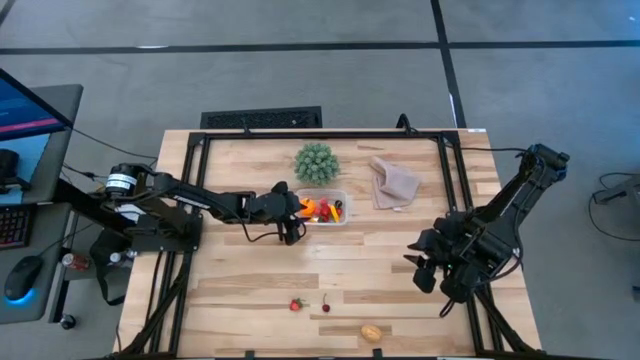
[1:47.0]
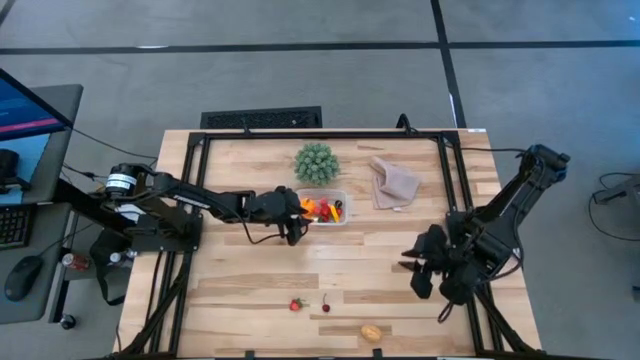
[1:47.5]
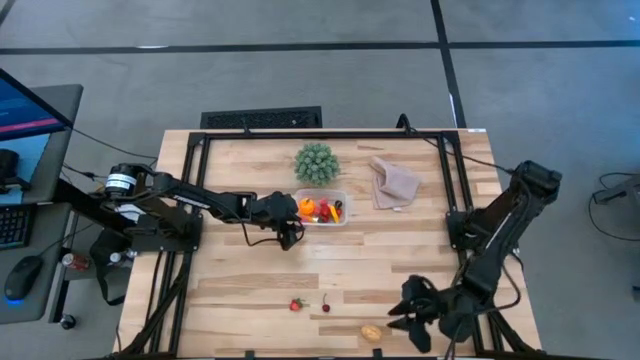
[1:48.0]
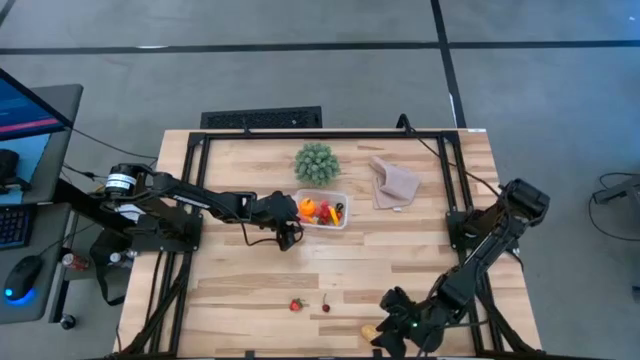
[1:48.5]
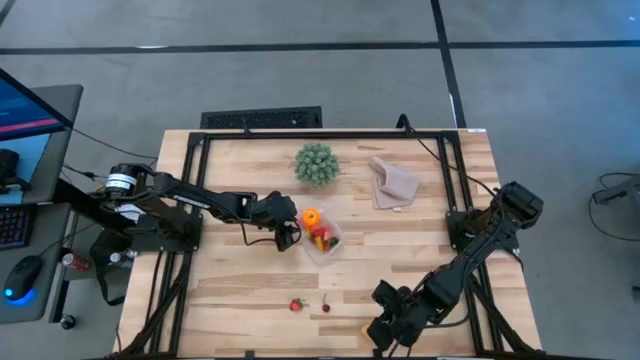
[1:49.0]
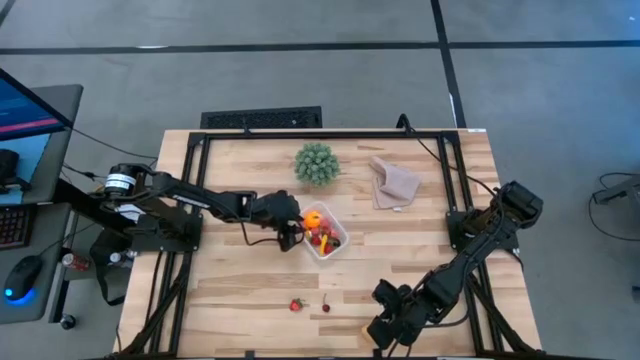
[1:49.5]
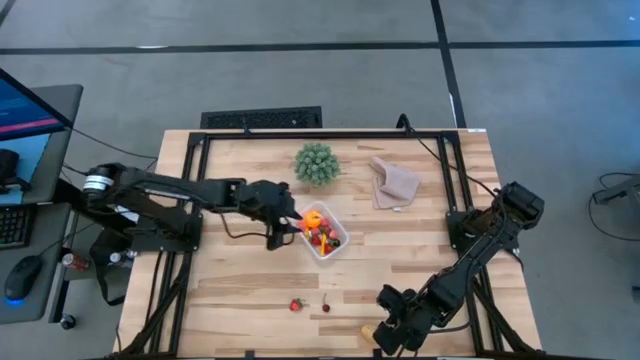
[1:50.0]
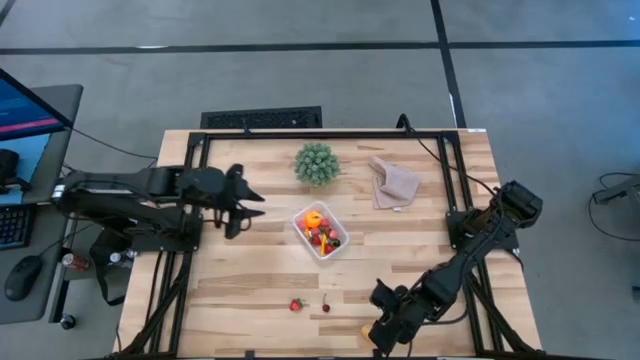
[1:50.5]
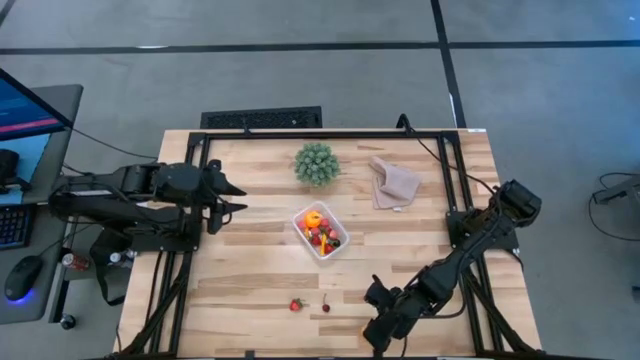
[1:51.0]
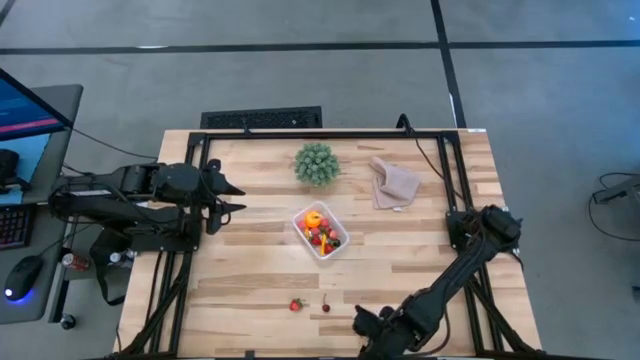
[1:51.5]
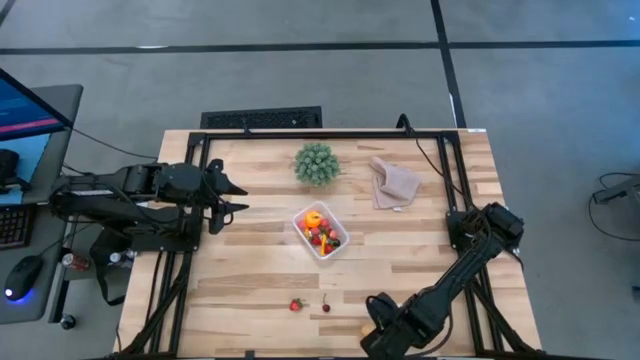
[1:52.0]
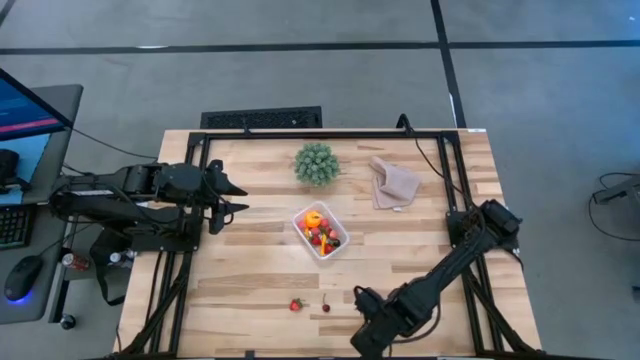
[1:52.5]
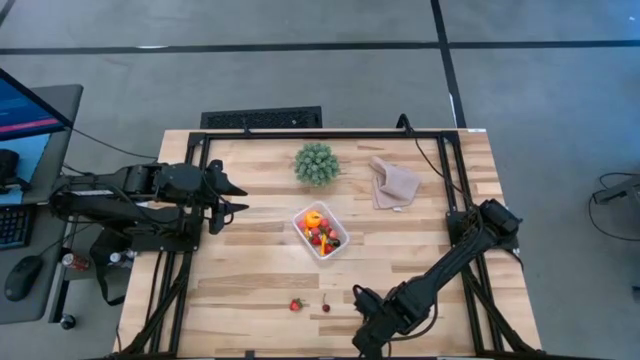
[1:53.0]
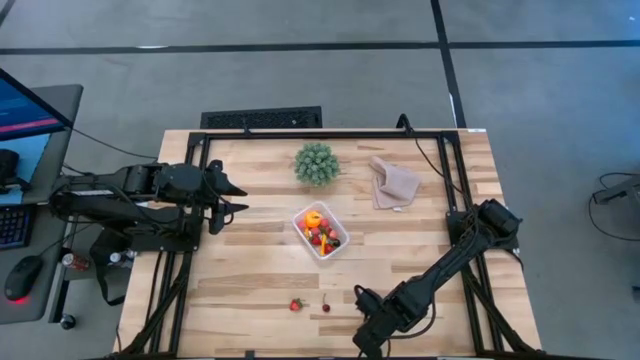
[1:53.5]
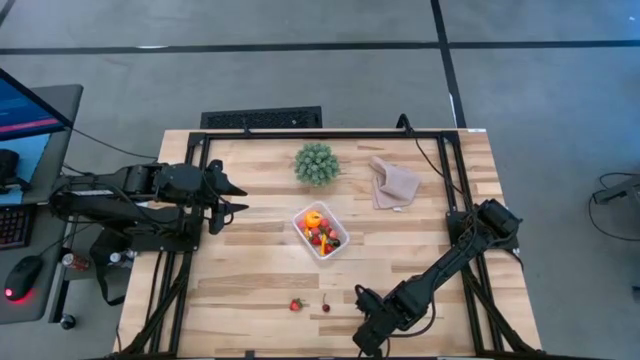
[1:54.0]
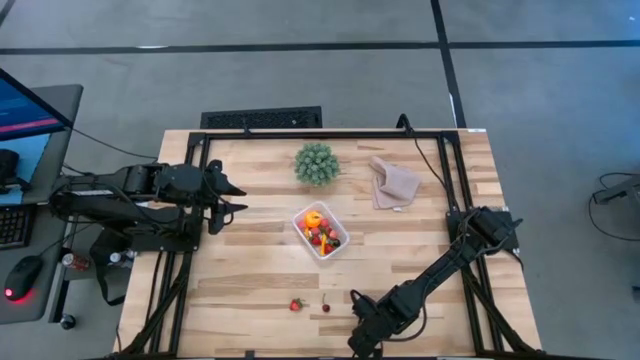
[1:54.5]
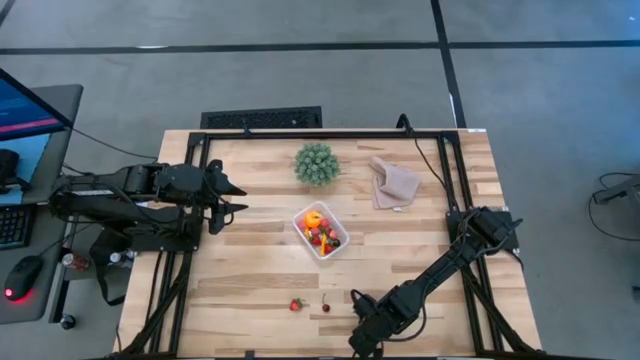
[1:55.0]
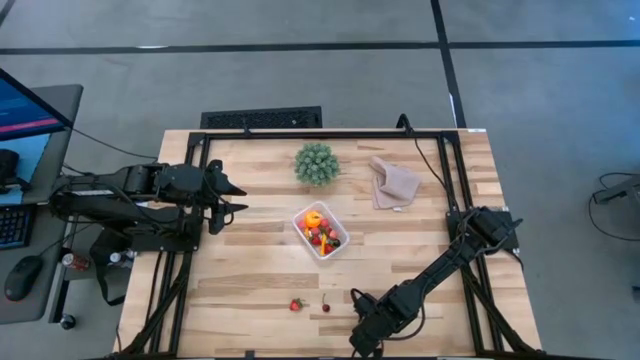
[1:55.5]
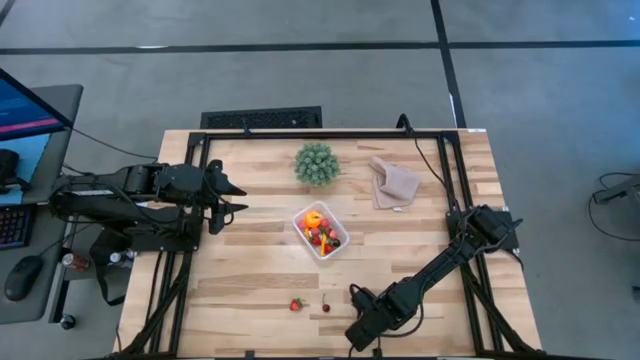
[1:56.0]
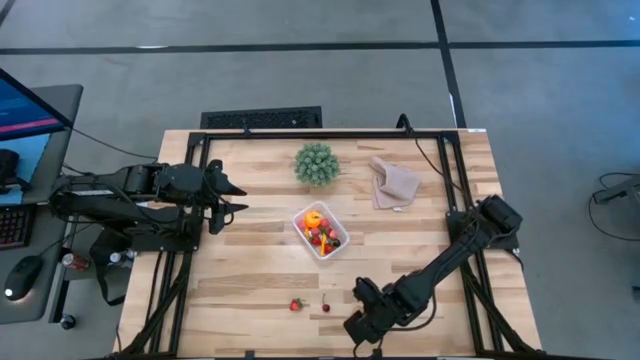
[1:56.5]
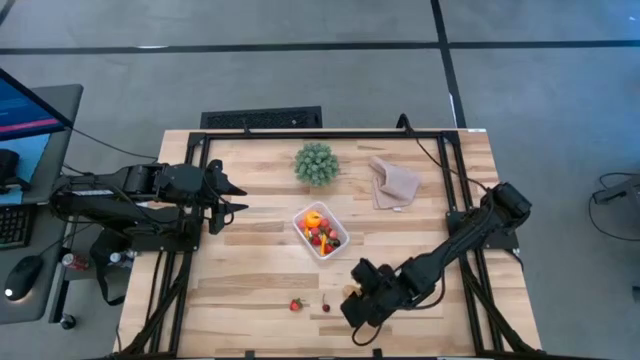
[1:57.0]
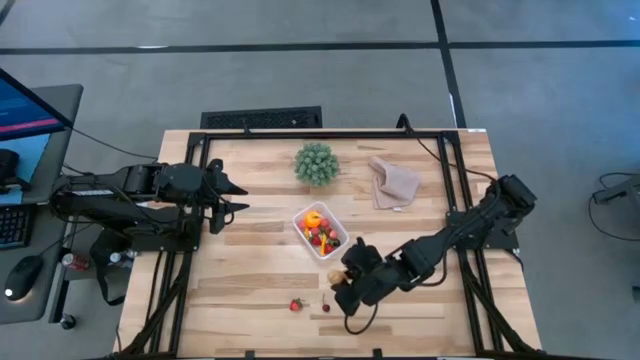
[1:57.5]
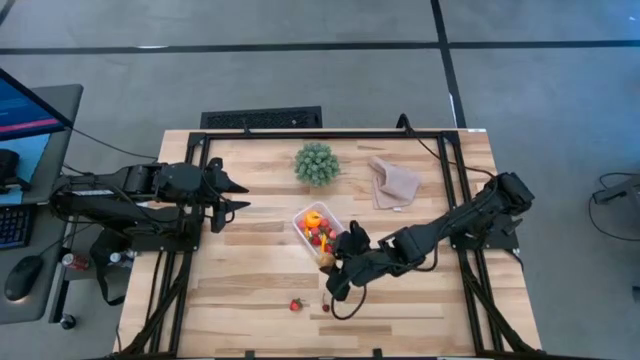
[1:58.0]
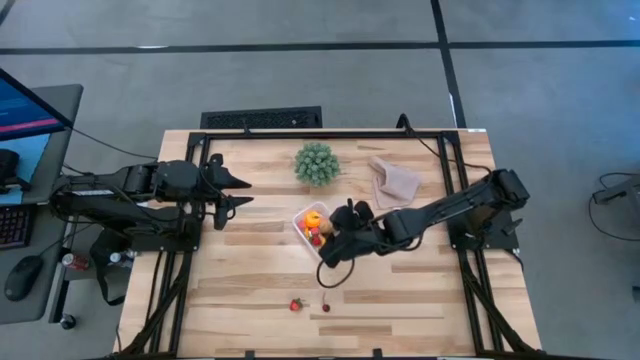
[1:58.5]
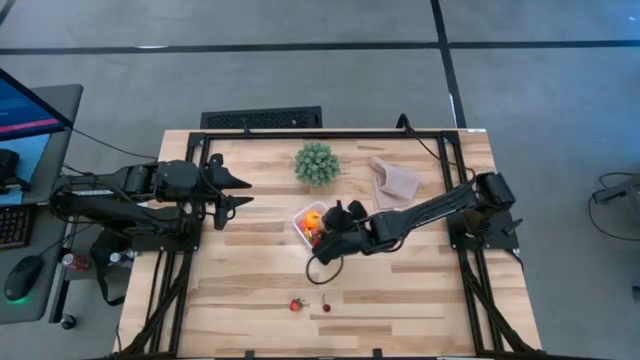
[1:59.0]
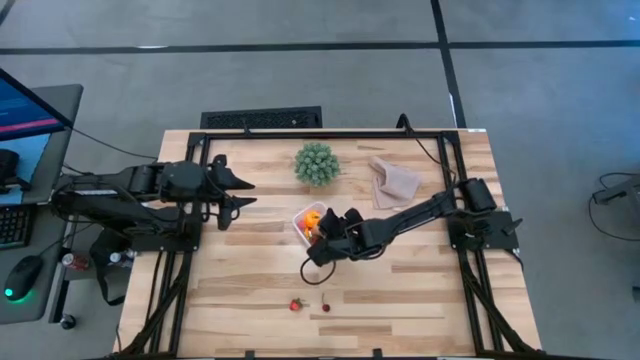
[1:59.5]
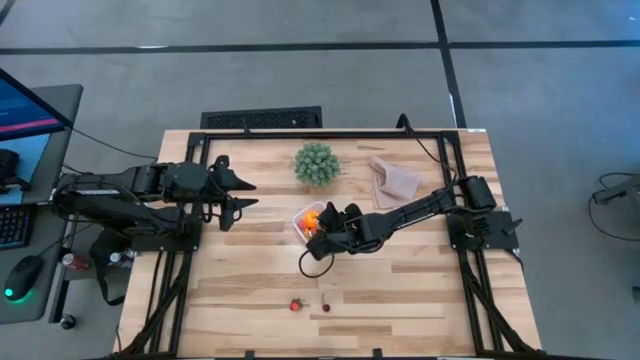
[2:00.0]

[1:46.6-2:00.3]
Task: Pick and placing Produce into tupperware
Put the brown potato into the transparent container

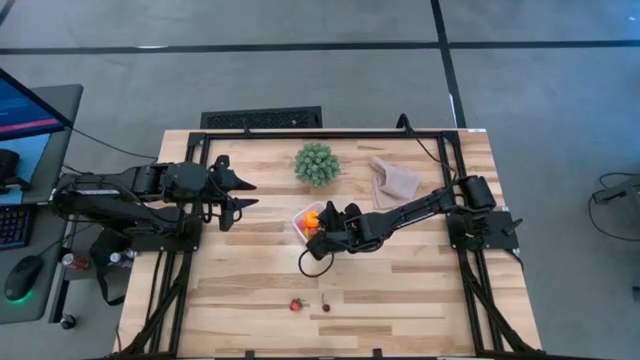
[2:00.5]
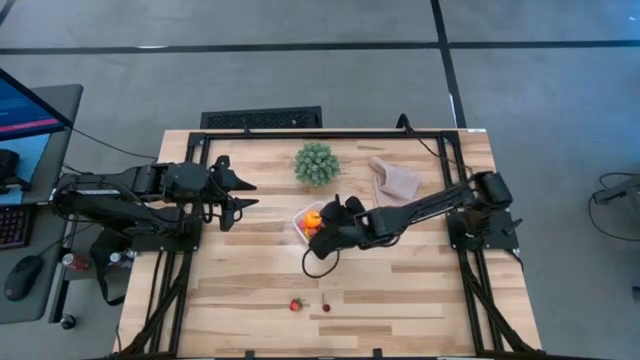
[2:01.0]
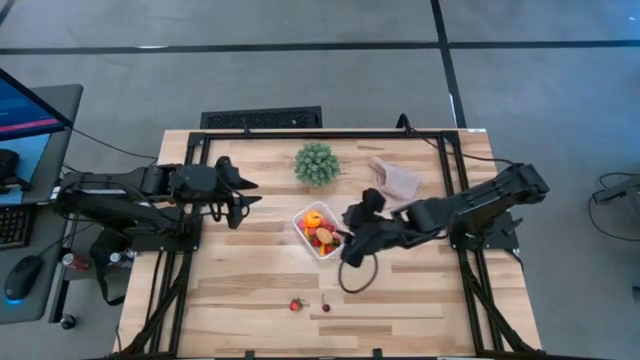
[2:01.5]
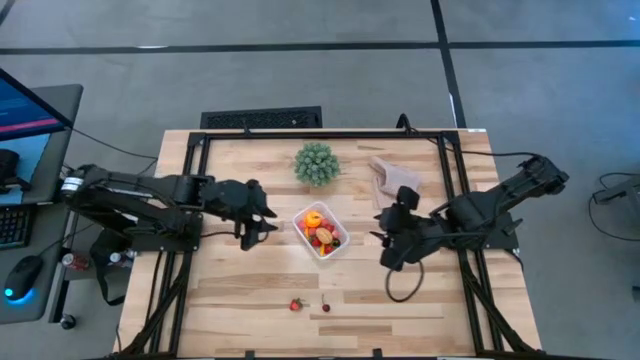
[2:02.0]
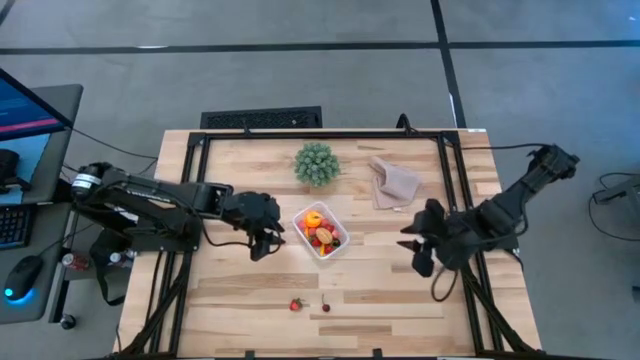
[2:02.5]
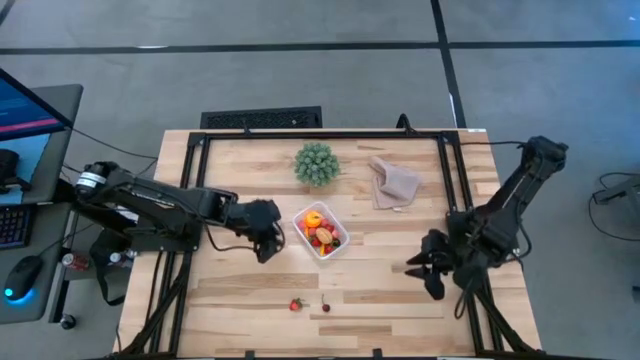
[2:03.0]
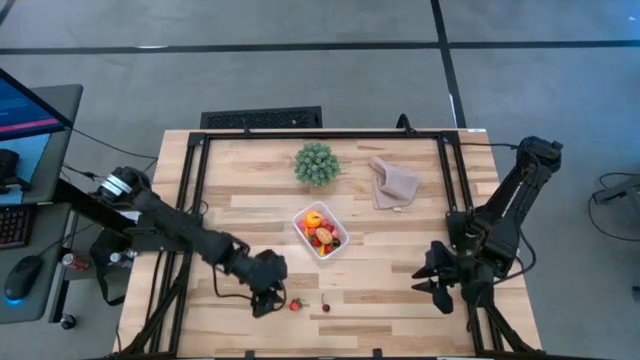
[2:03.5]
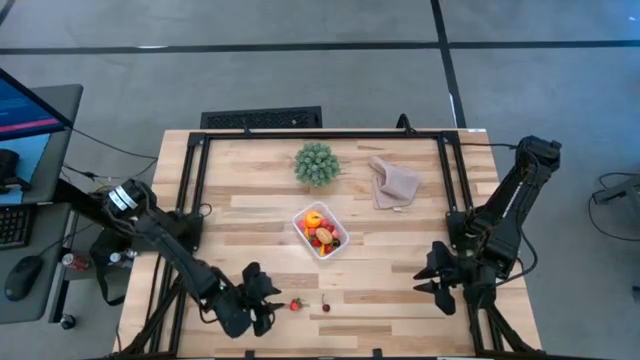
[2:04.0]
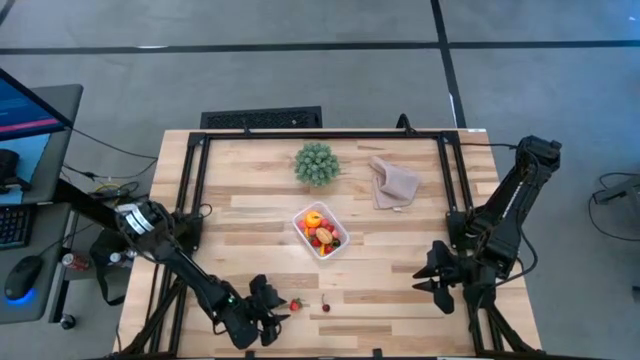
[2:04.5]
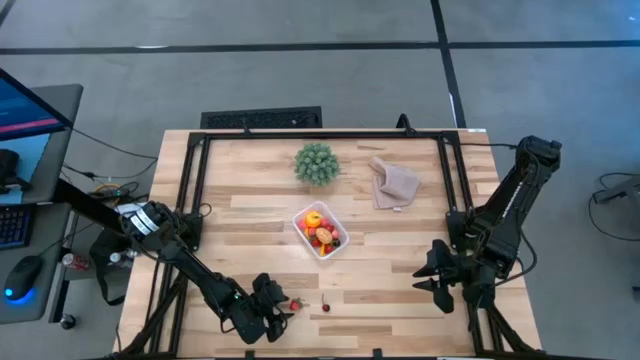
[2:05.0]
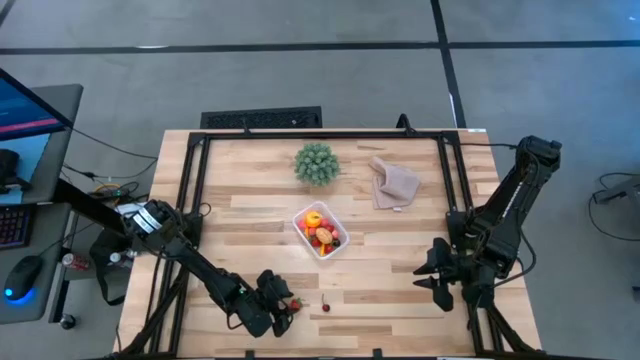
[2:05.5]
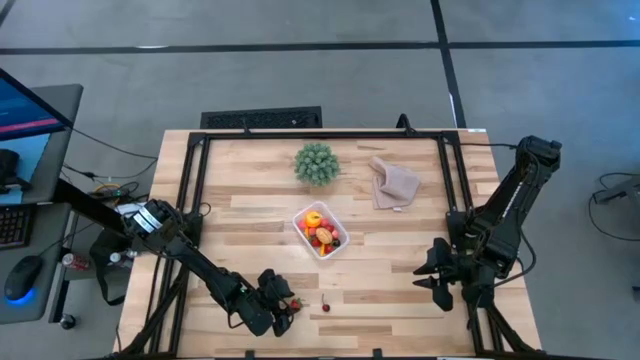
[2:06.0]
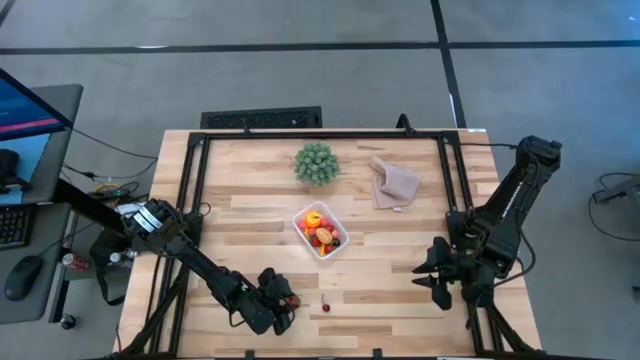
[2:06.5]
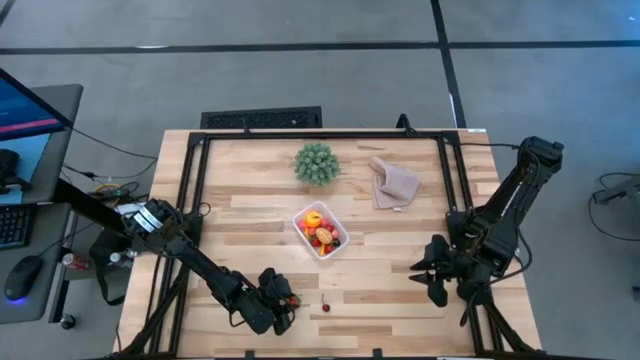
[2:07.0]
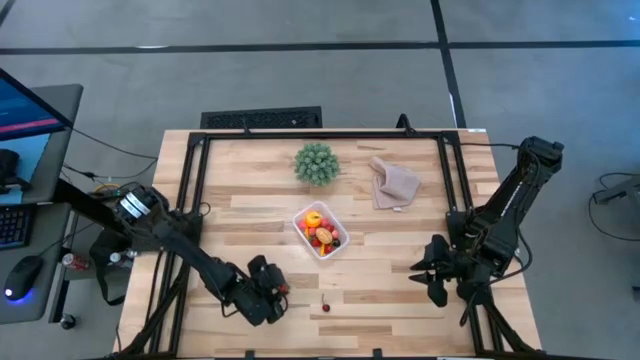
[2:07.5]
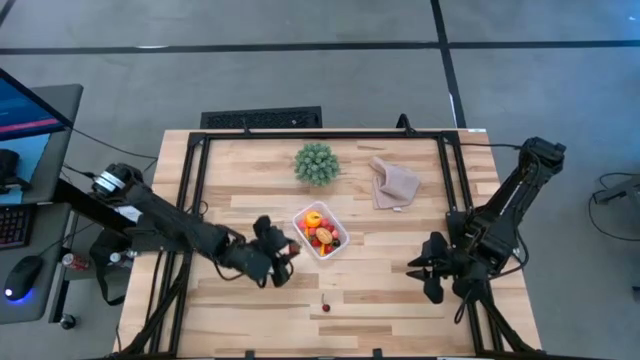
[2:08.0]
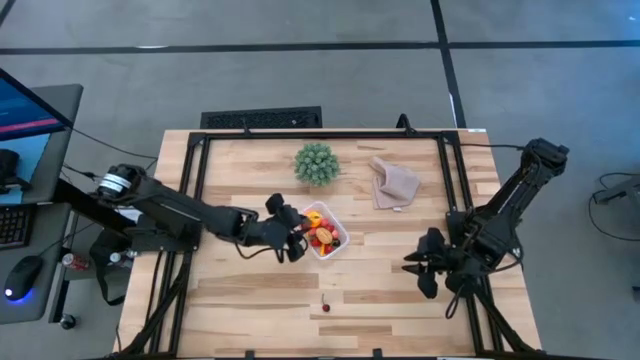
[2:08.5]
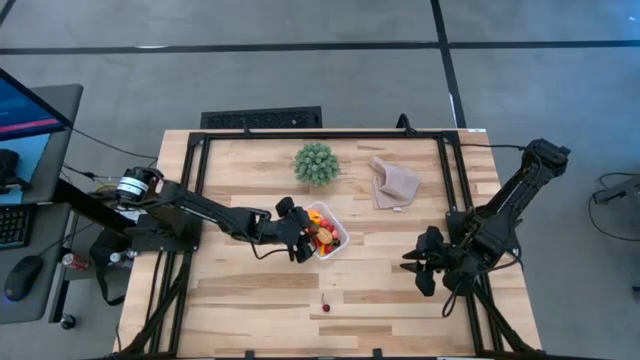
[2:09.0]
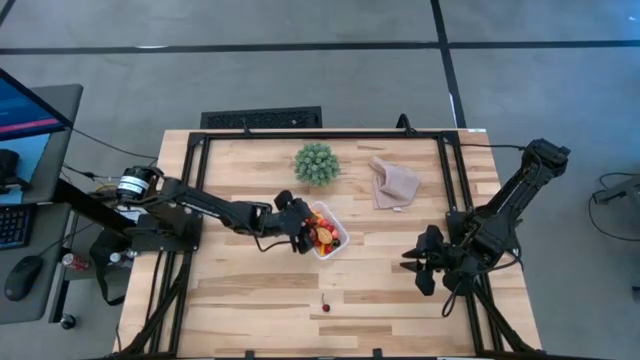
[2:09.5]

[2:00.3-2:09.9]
Put the red strawberry into the transparent container
